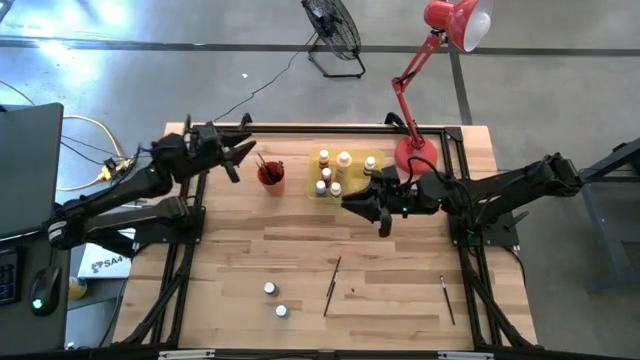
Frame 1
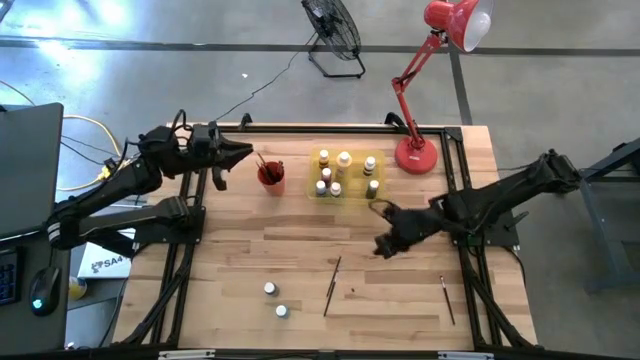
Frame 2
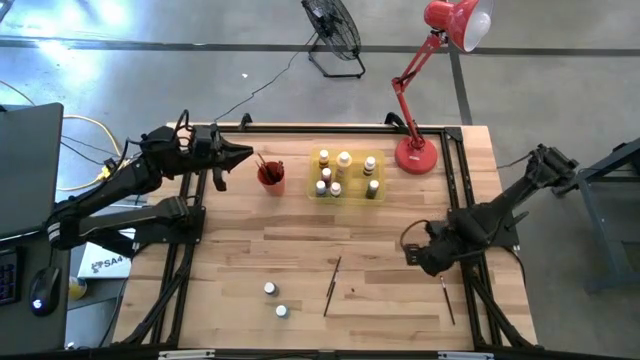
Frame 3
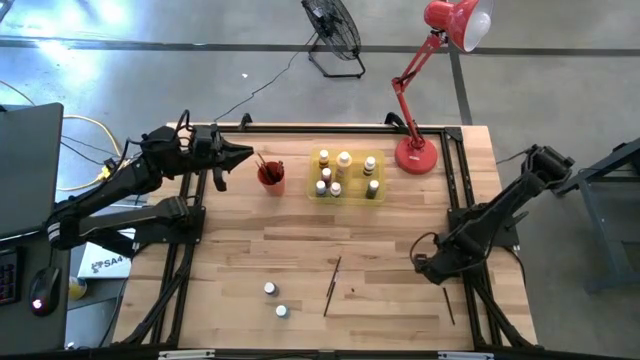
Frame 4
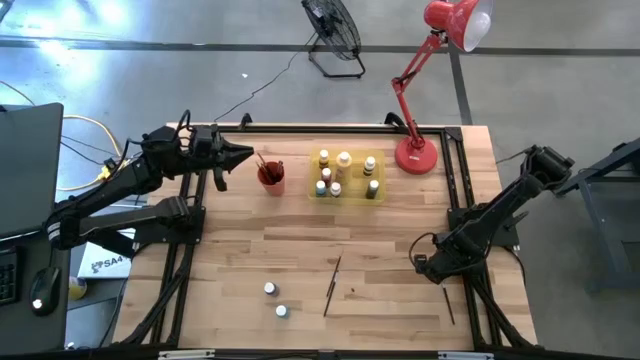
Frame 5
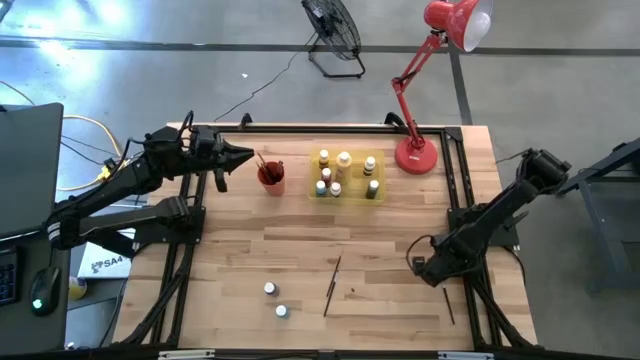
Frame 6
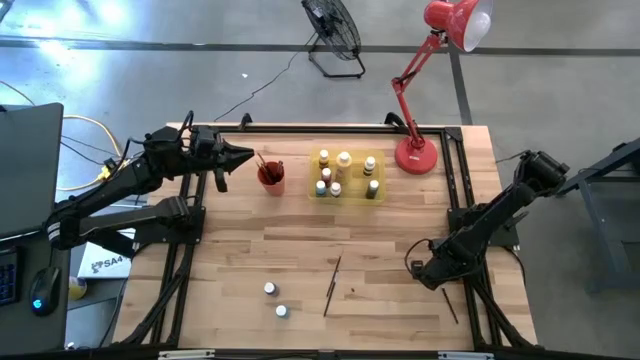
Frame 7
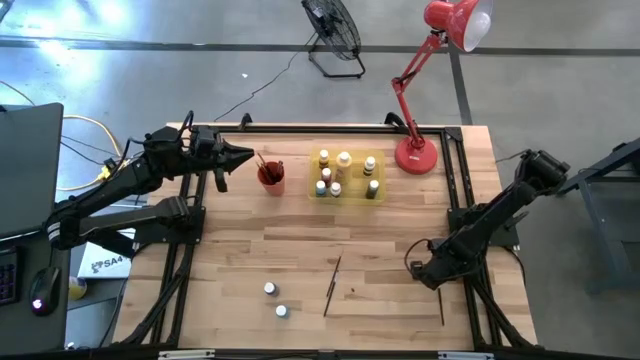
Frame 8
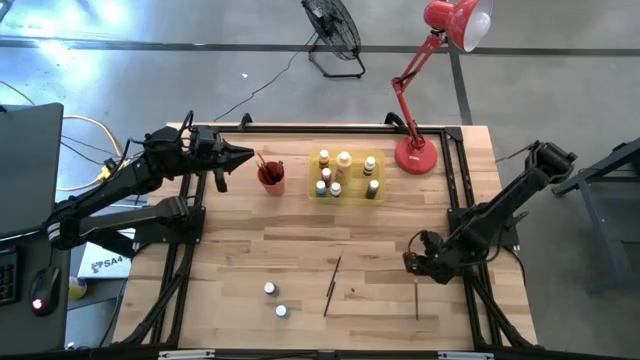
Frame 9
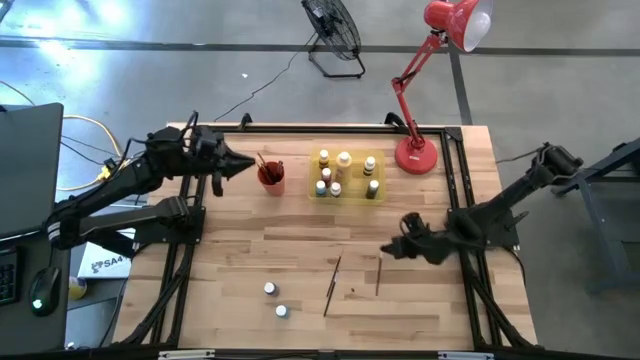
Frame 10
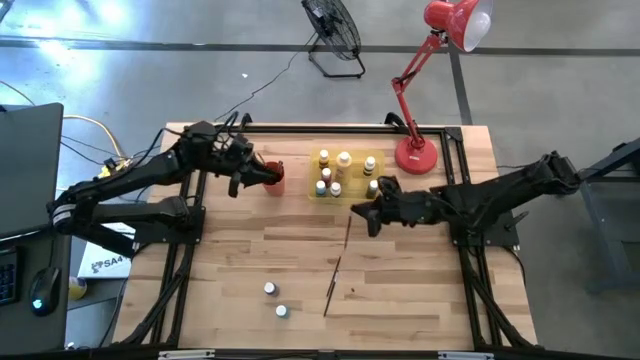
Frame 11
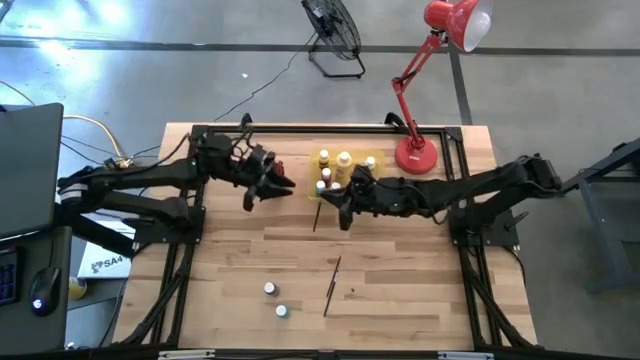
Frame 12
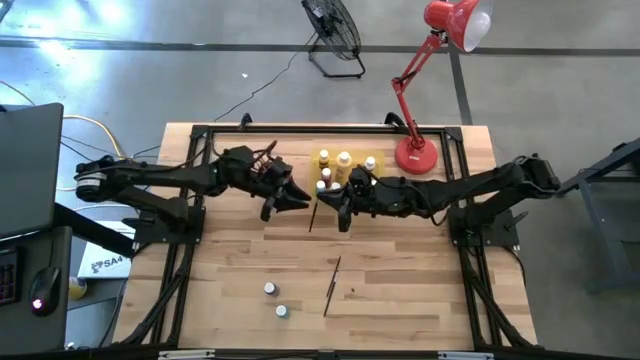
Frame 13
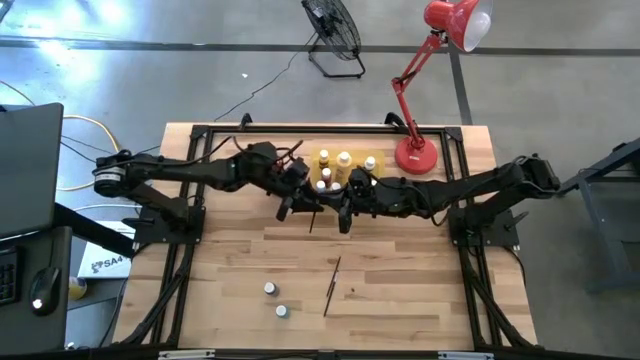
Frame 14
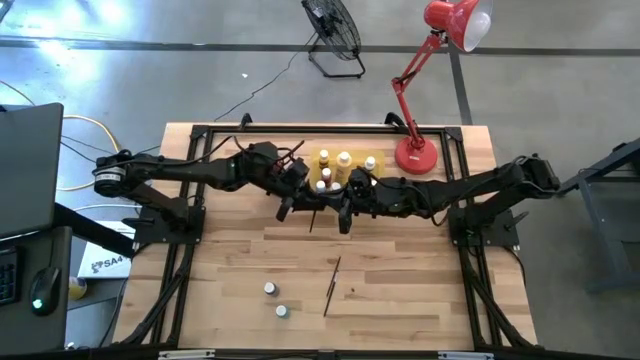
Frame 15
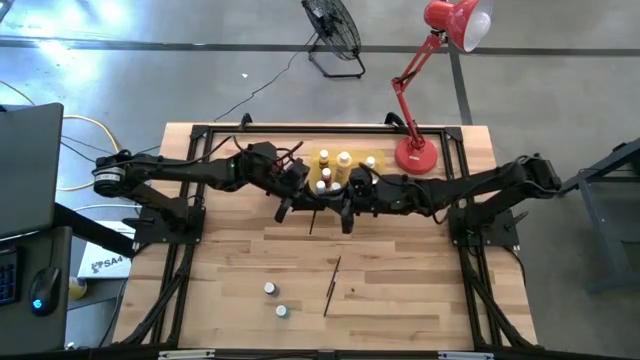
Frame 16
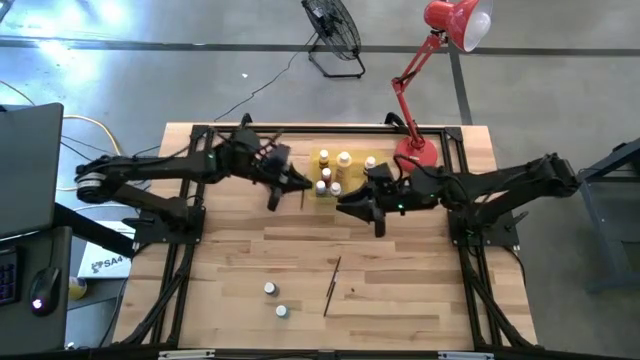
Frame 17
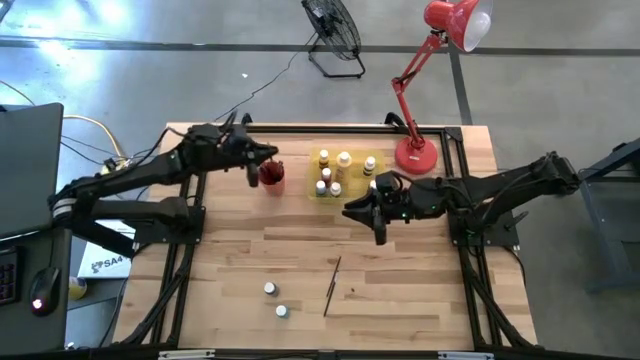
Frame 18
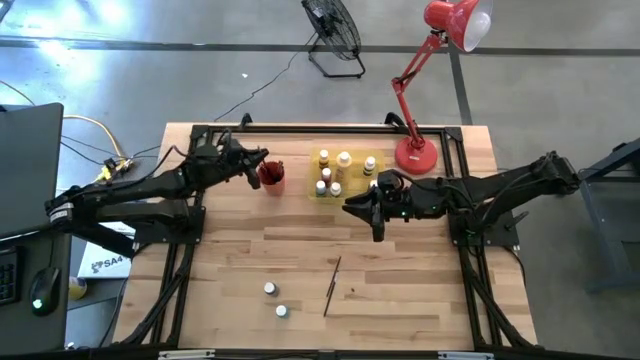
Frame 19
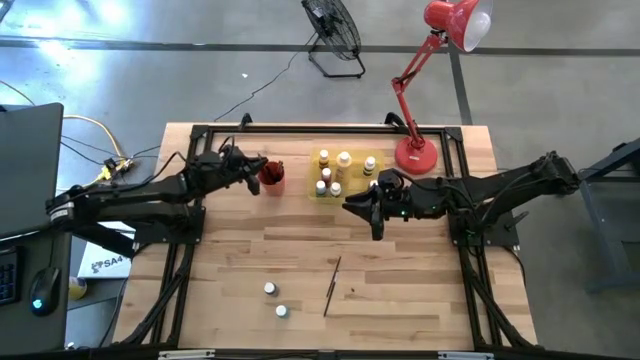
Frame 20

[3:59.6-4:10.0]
Task: Pick & Place Paint Supplies
Put the silver paintbrush into the orange cup

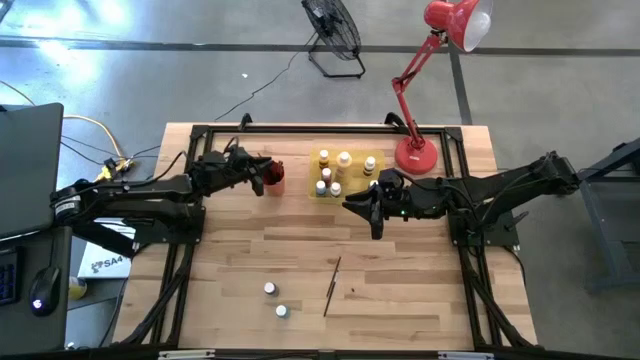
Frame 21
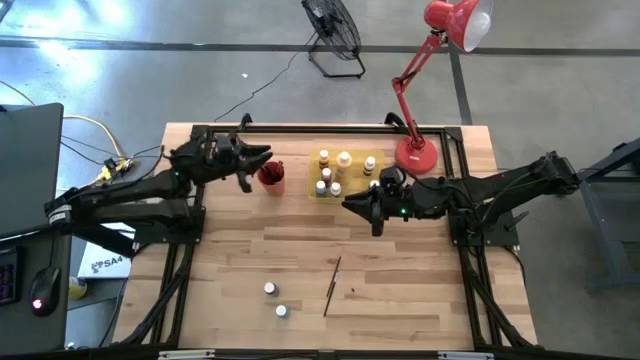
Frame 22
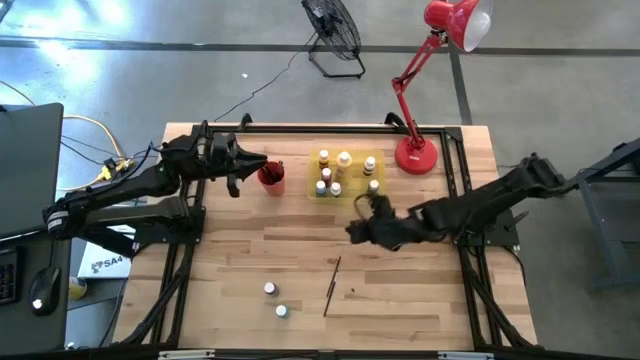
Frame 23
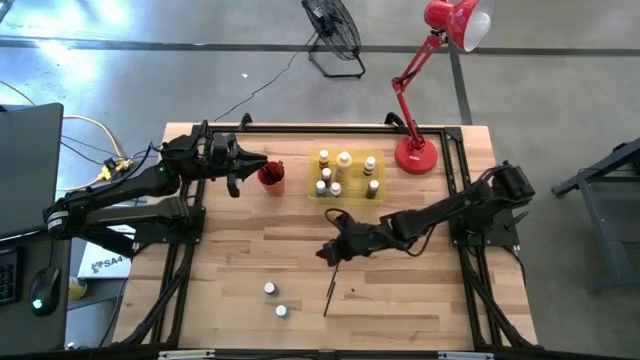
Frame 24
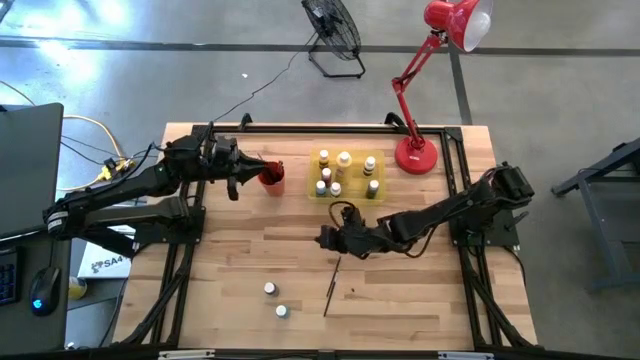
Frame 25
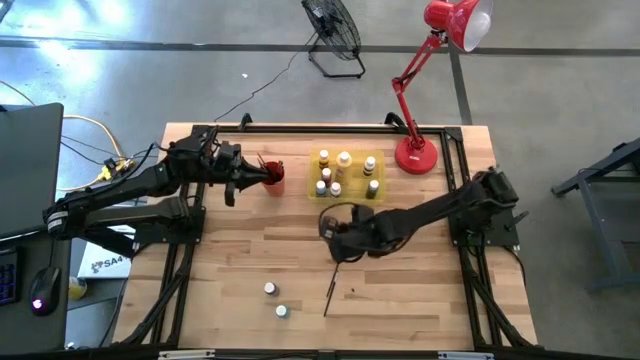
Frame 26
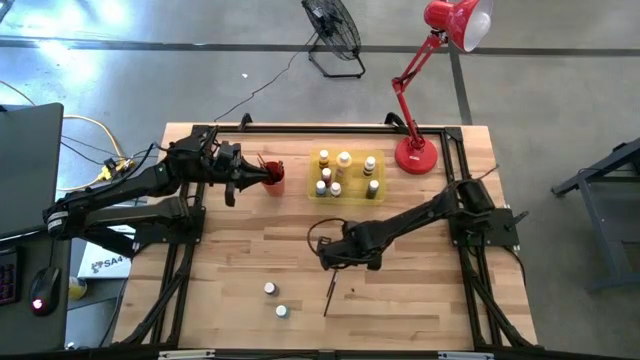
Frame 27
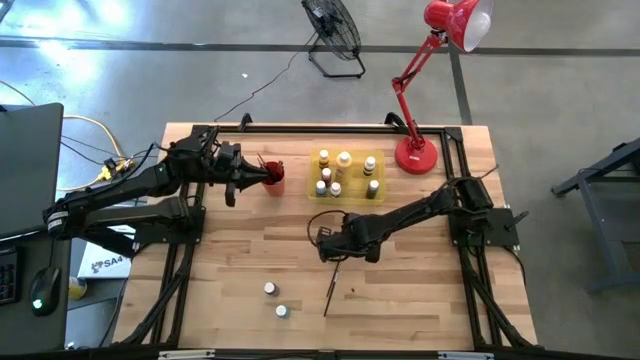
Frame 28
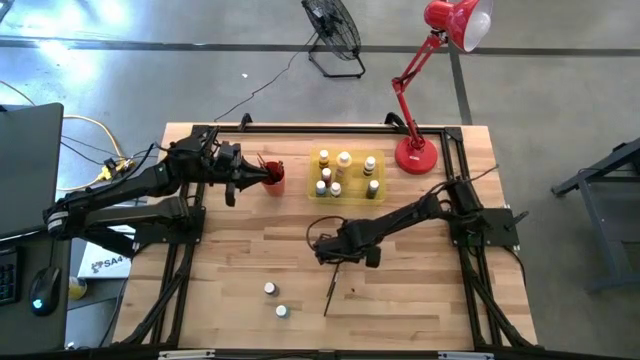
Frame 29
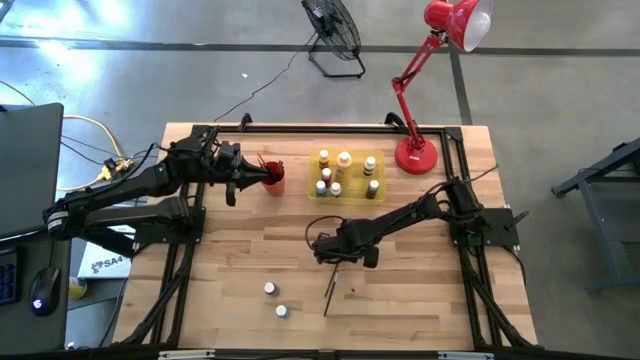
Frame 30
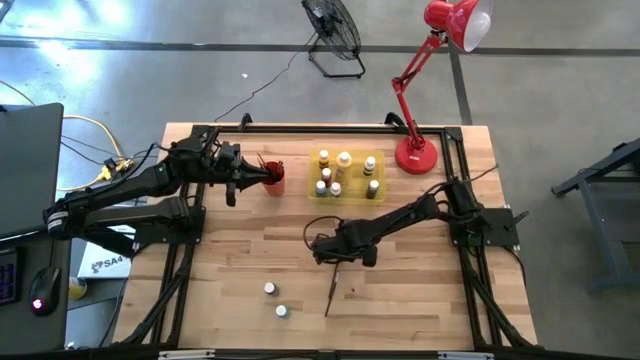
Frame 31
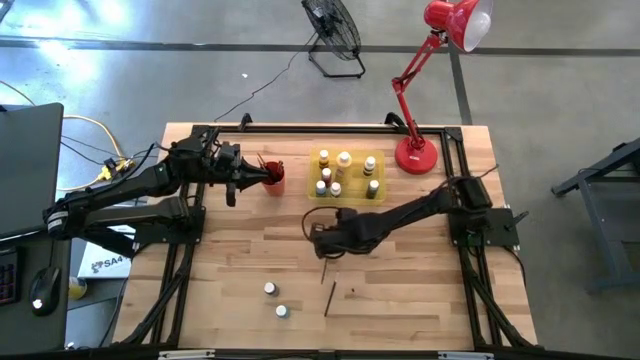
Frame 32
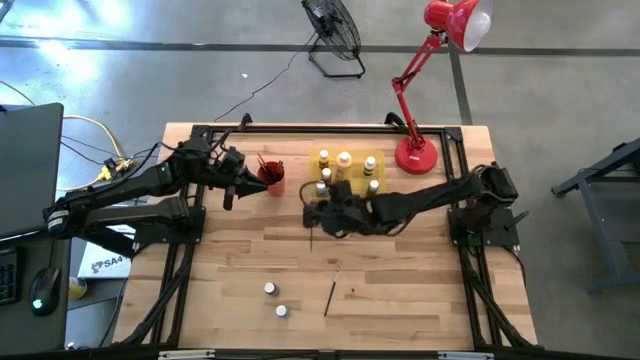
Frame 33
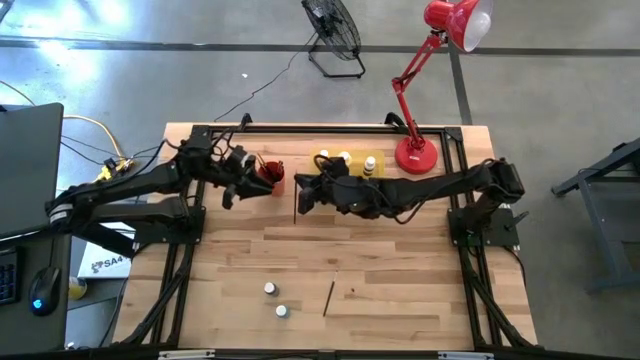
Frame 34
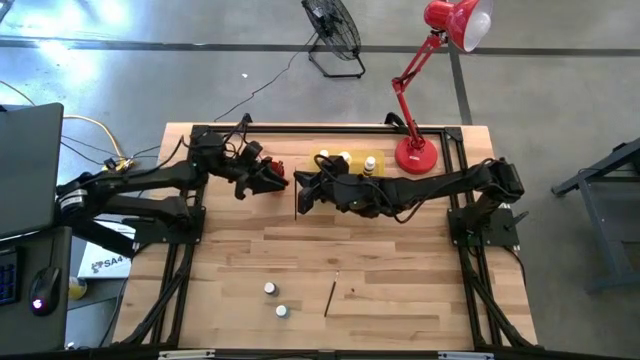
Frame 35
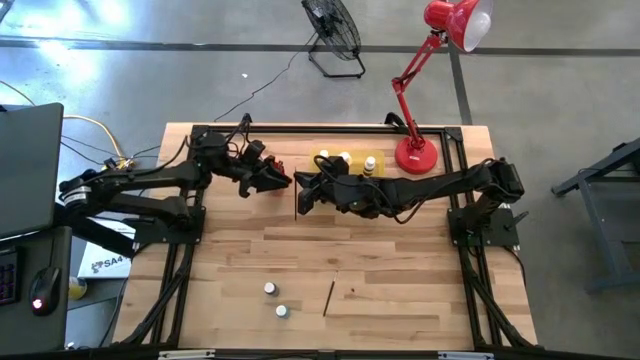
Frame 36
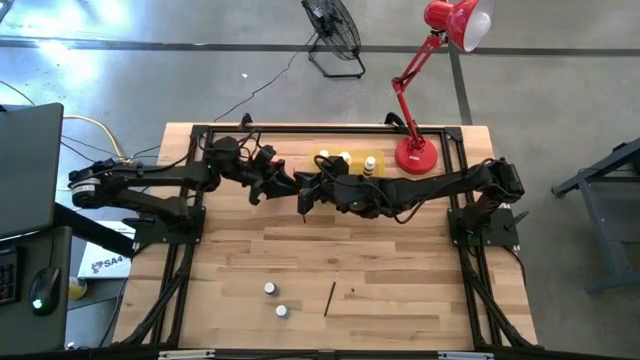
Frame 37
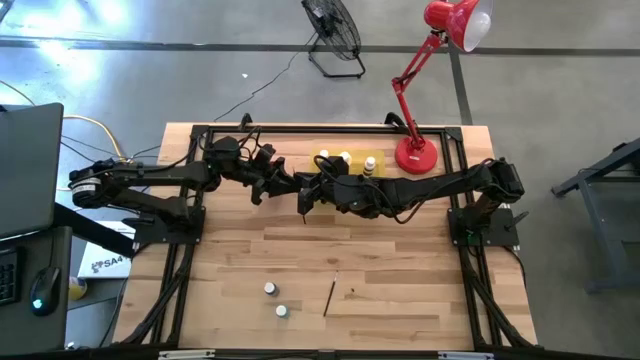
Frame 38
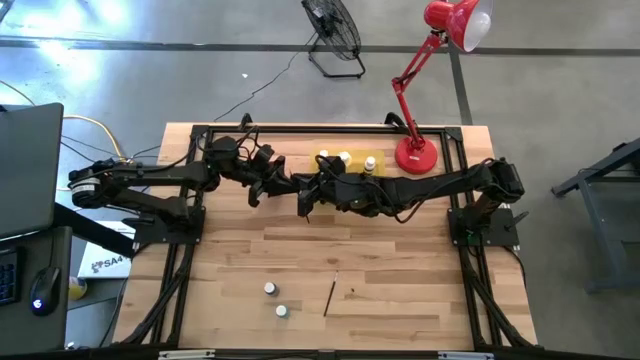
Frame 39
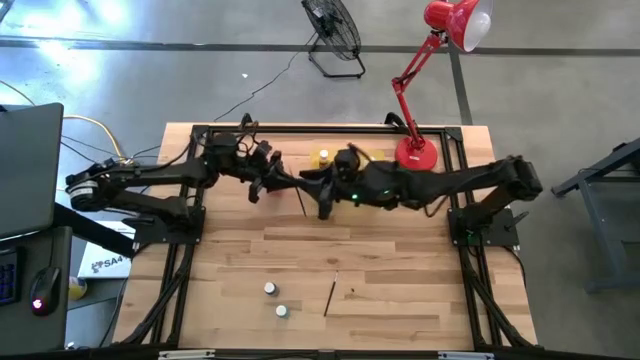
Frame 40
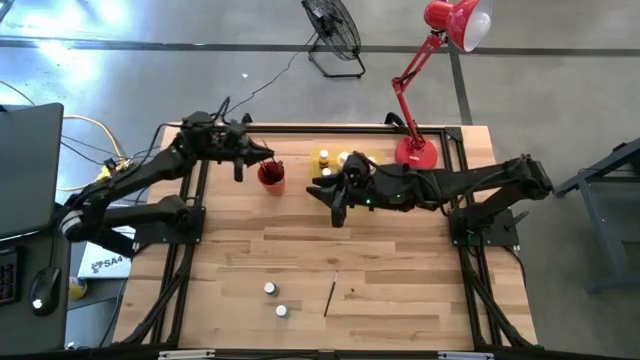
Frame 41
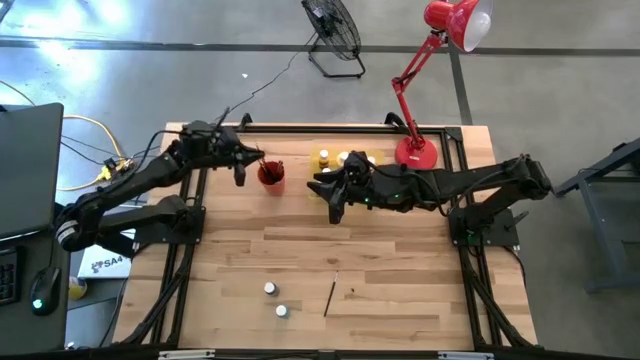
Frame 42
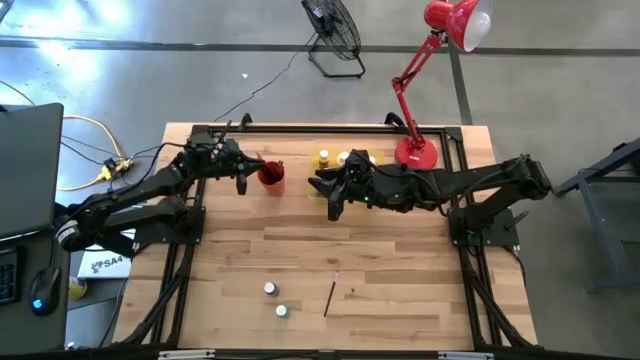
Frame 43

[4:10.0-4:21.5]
Put the orange paintbrush into the orange cup

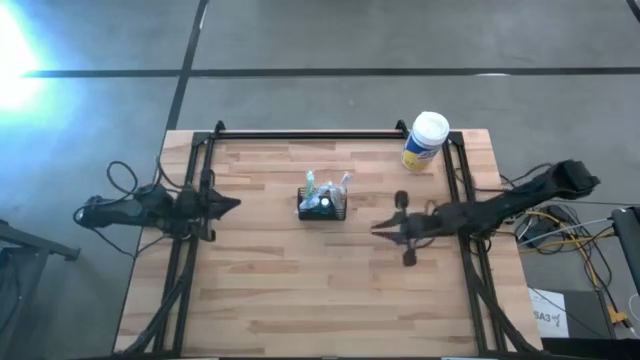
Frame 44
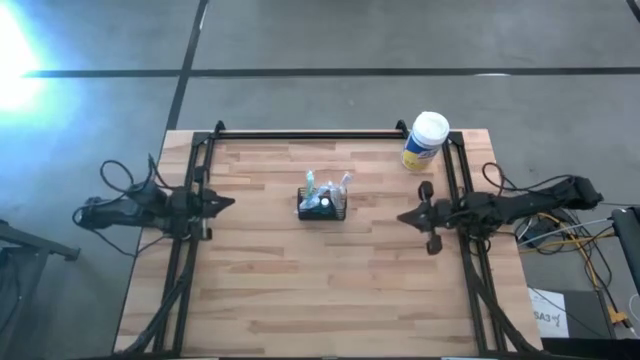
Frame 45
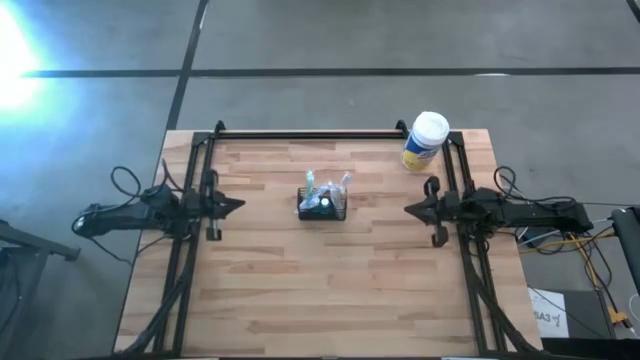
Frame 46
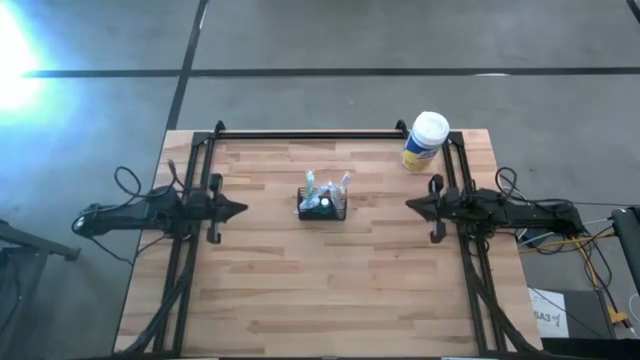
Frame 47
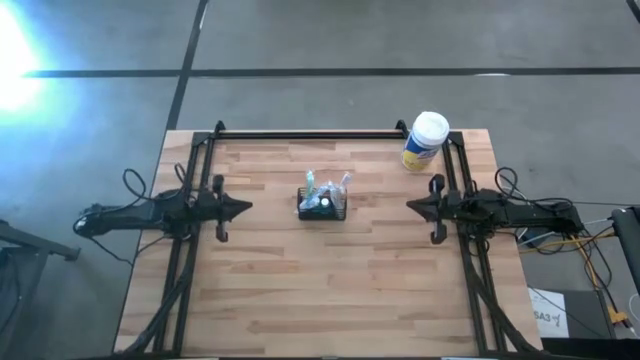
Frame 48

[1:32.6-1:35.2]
Task: Pick & Place toothbrushing station
Return to Home Position
